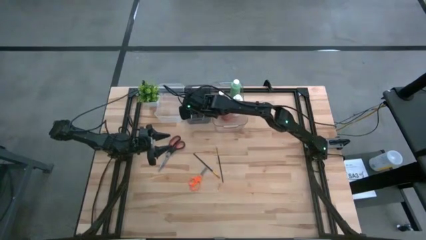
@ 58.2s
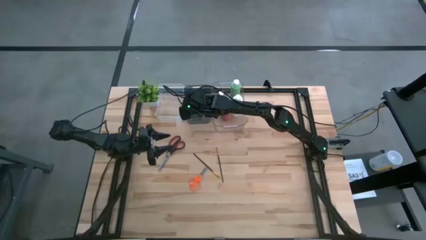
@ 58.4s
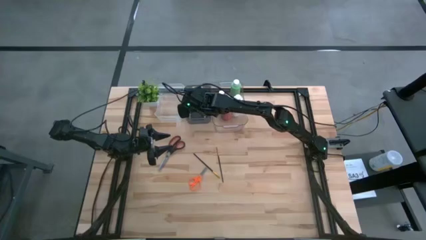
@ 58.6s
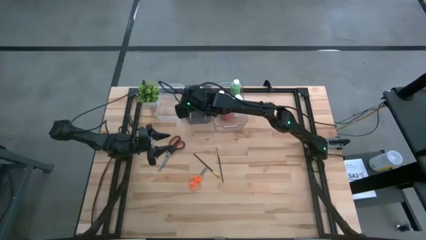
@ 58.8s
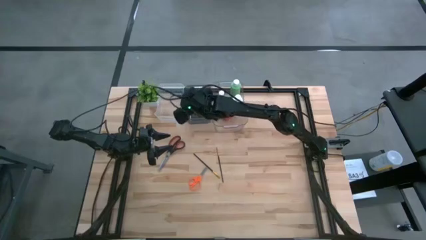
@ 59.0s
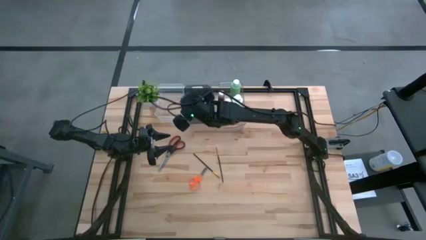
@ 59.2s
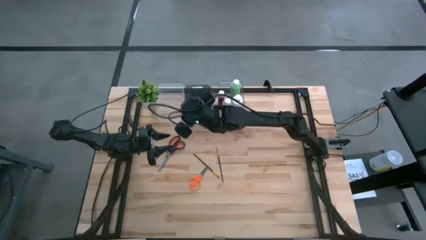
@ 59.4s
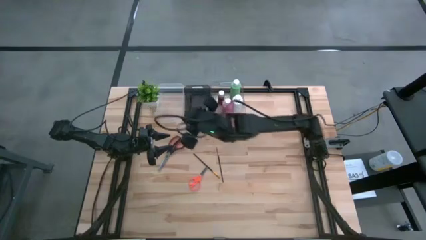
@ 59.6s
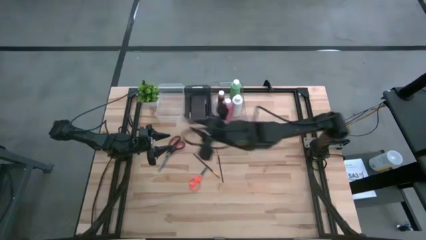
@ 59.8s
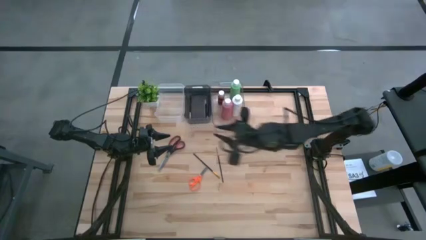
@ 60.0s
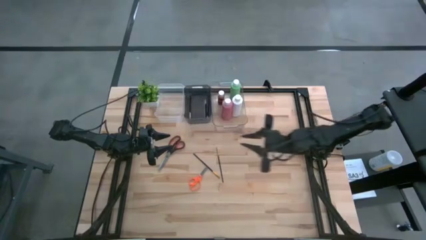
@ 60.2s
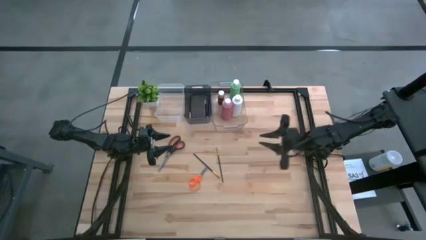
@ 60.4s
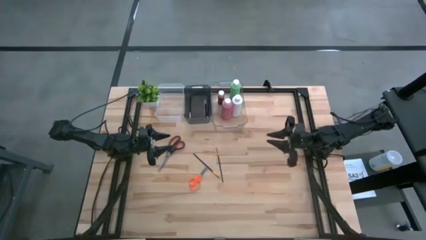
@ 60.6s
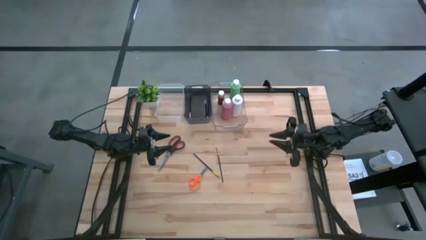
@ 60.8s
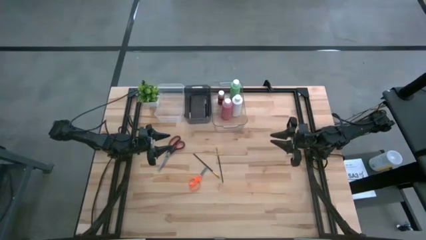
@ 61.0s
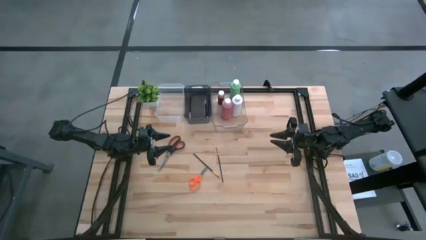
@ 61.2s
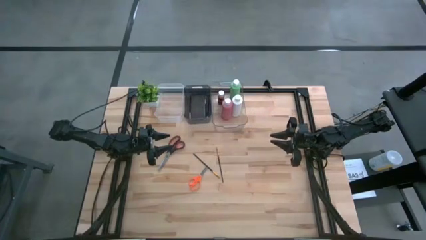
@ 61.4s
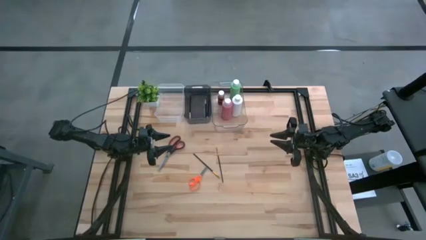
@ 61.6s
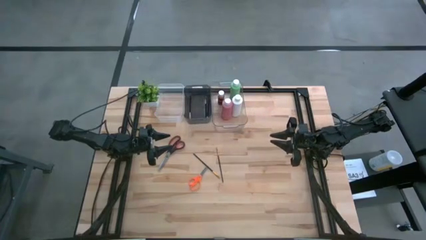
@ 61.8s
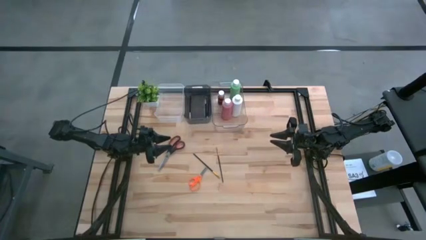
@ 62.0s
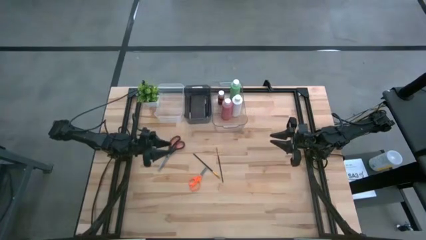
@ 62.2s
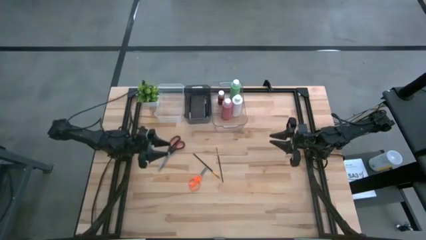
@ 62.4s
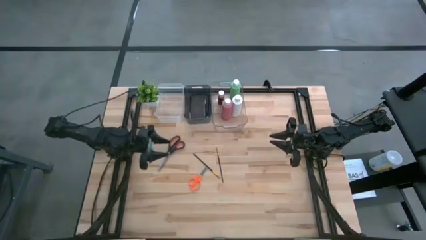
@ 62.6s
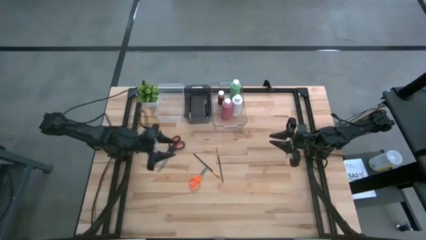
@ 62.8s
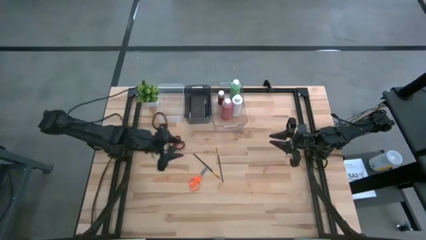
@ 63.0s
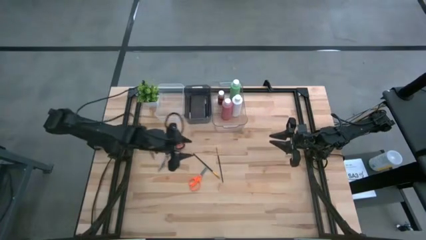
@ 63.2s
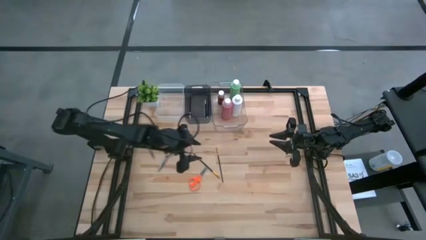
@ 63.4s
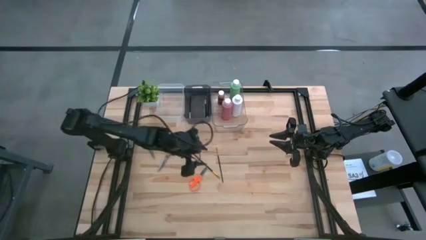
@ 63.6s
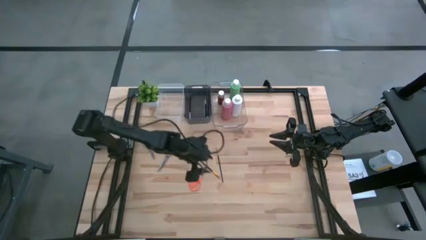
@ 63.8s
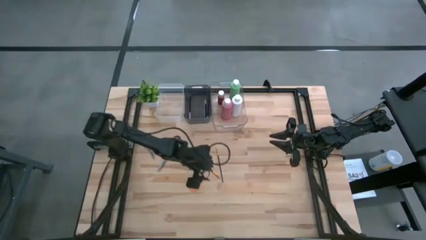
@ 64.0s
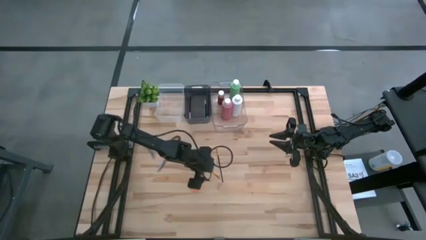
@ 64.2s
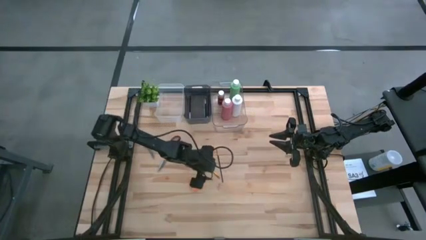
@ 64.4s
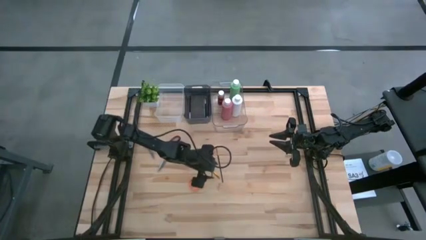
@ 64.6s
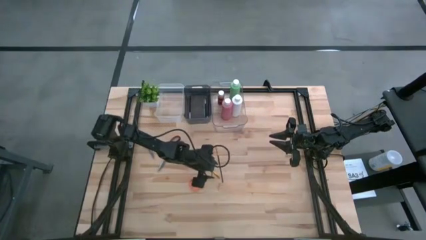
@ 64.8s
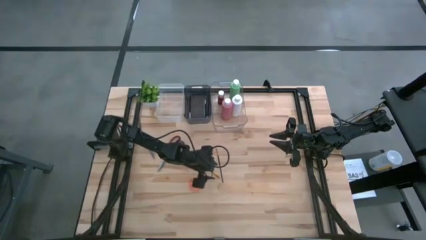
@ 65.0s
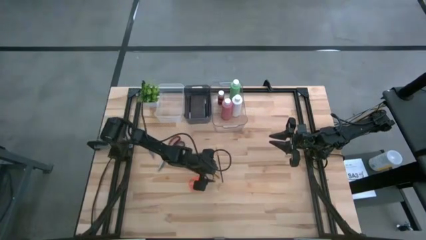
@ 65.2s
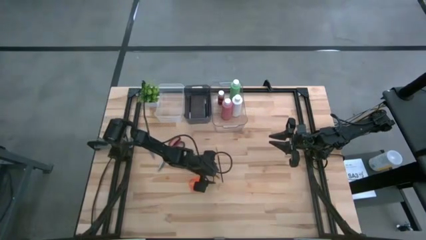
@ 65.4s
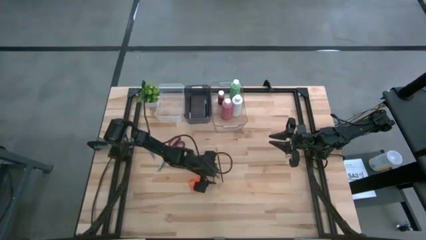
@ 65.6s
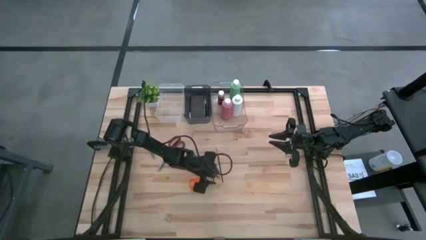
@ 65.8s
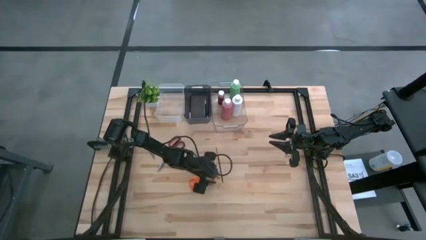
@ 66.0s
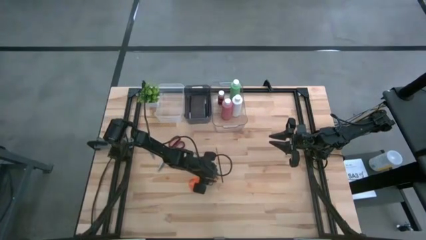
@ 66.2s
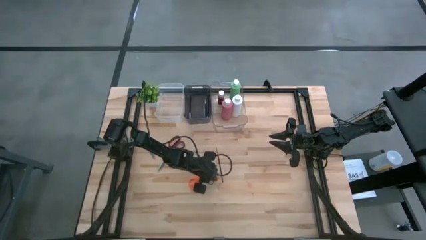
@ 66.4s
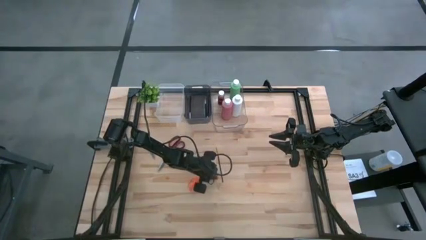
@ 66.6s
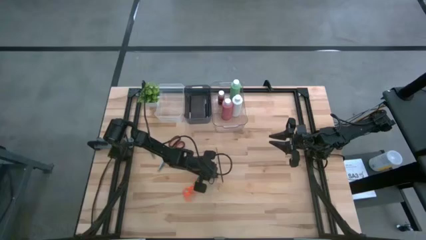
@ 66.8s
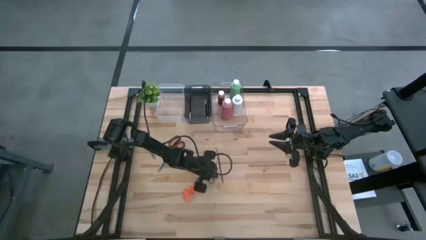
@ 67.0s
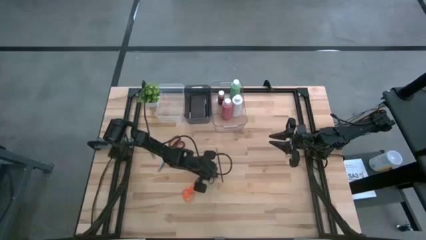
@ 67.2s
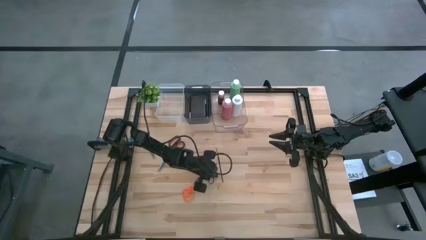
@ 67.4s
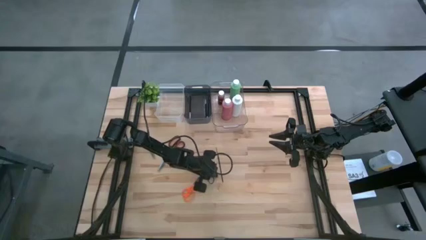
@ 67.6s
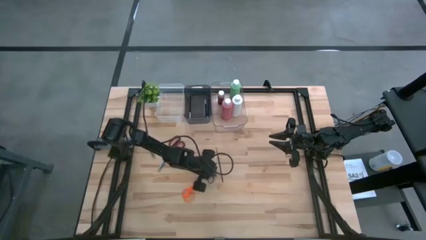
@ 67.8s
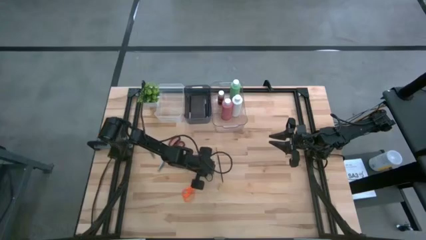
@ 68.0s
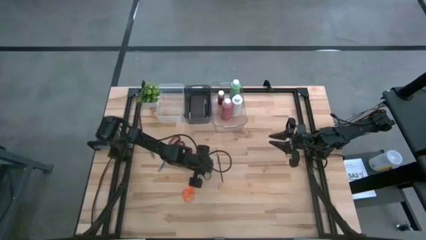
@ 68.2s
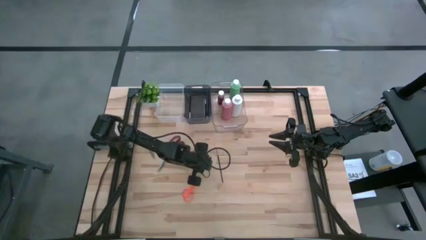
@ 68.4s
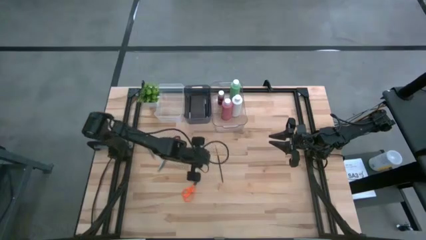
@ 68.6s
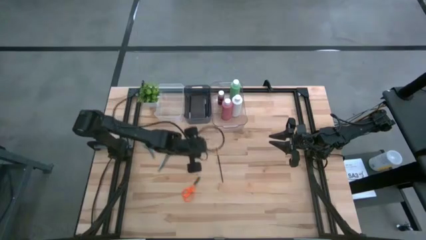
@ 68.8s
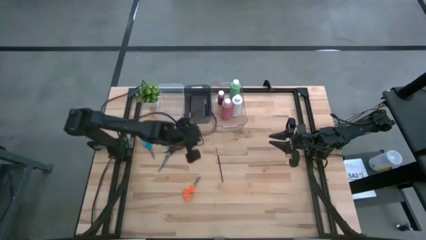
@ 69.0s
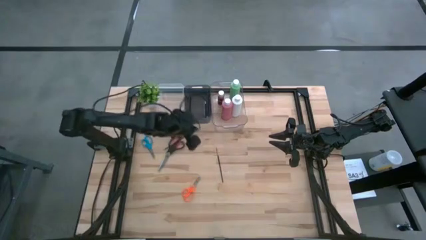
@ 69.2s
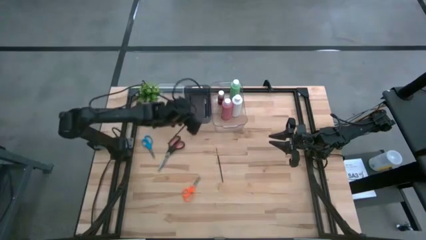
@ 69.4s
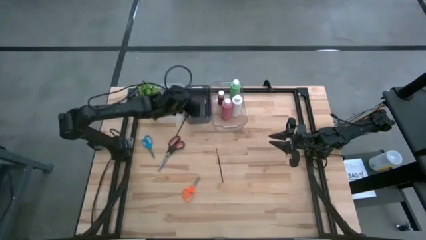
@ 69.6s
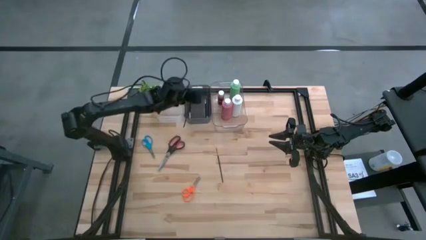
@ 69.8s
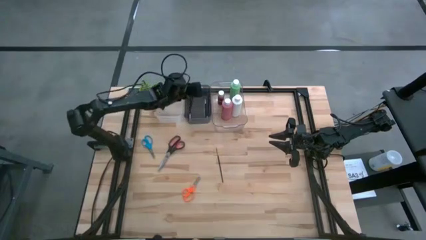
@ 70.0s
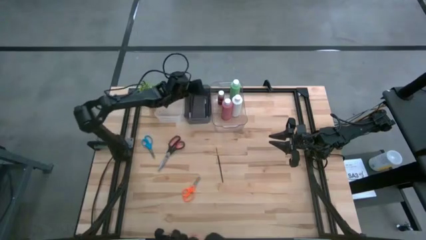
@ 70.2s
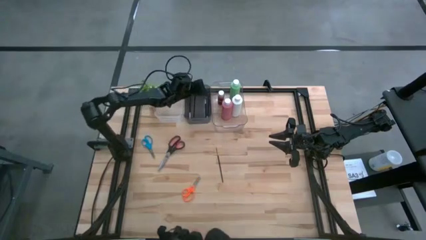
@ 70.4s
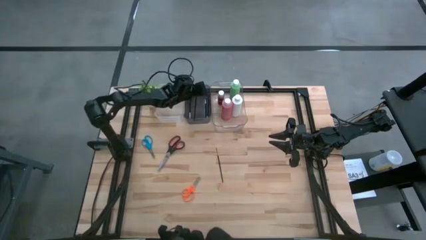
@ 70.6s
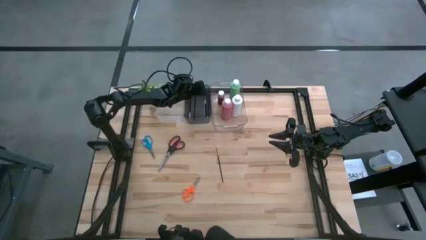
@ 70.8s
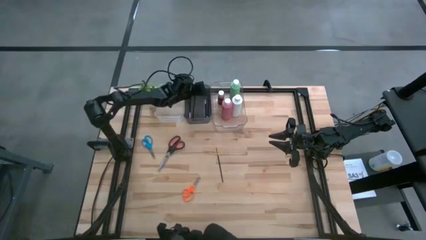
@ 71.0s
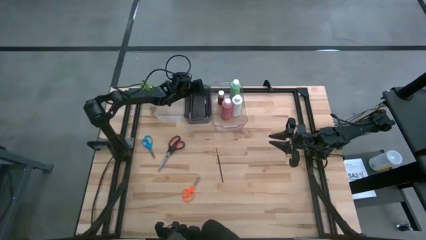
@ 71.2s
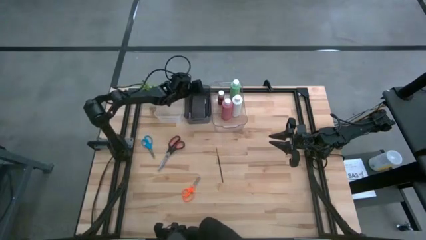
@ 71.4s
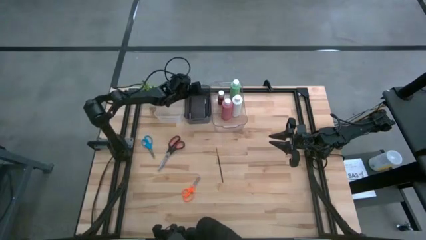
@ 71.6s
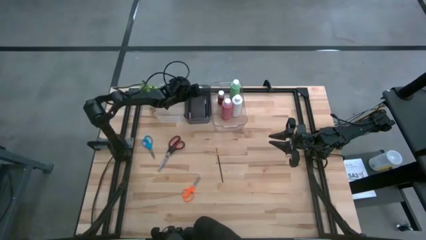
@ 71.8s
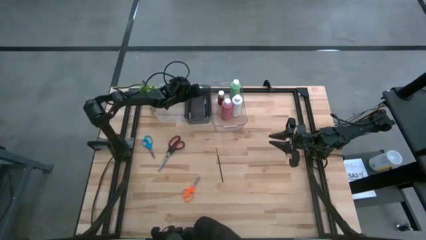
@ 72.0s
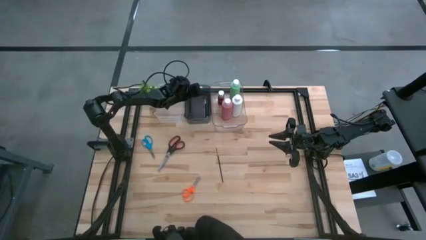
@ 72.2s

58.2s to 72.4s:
Task: Pick & Place Paint Supplies
Put the left gold paintbrush into the black bin

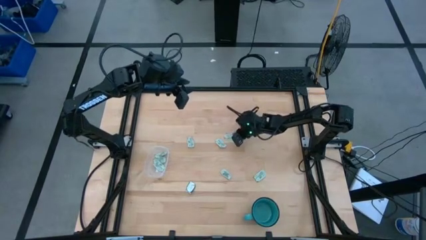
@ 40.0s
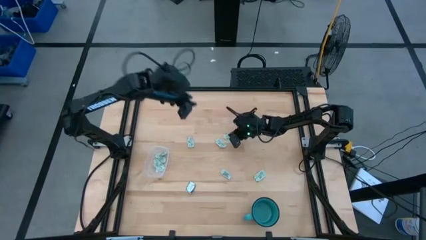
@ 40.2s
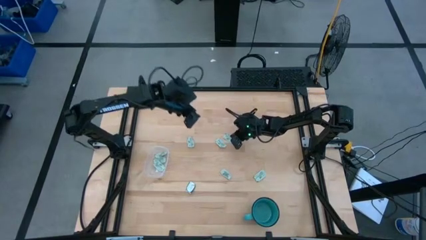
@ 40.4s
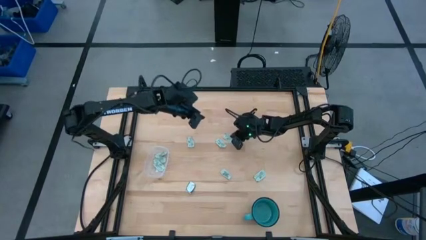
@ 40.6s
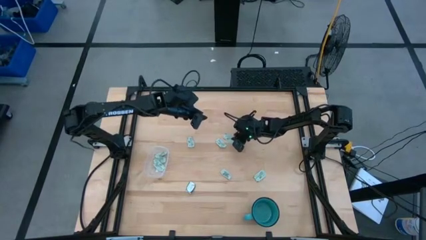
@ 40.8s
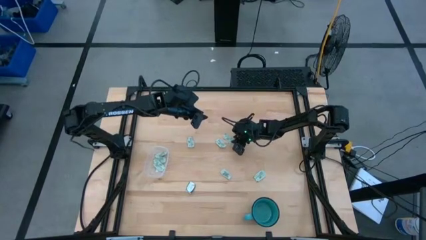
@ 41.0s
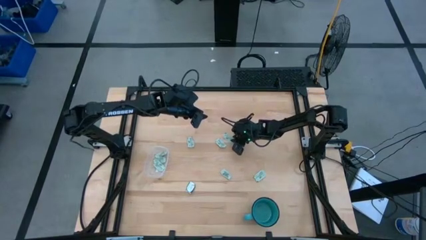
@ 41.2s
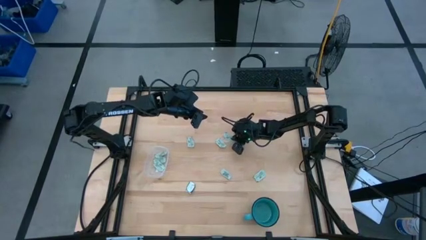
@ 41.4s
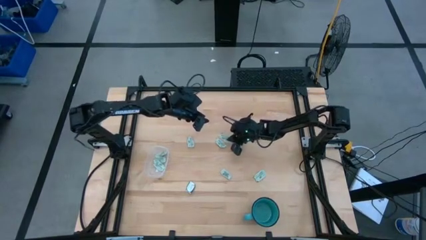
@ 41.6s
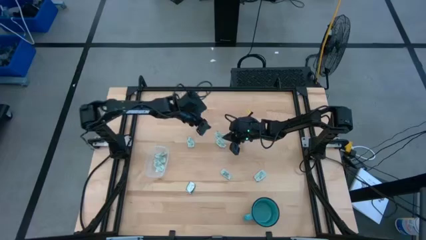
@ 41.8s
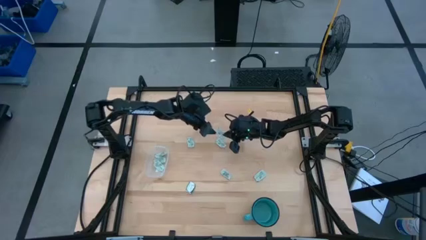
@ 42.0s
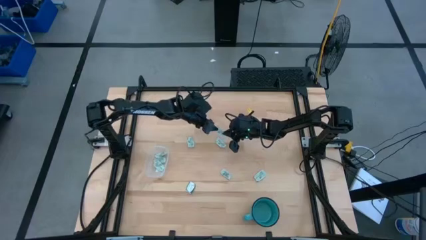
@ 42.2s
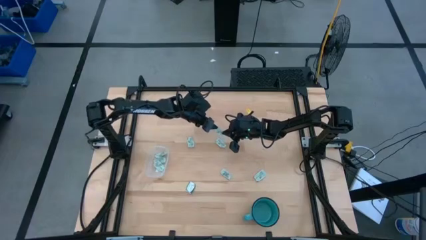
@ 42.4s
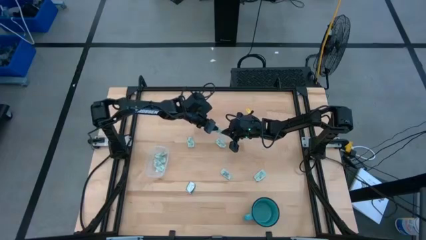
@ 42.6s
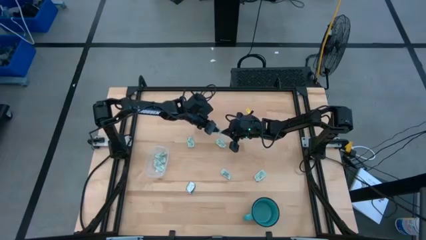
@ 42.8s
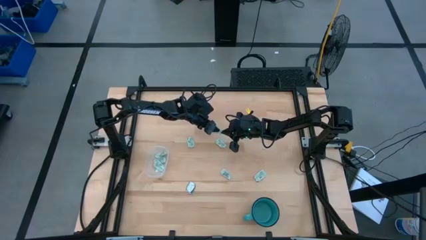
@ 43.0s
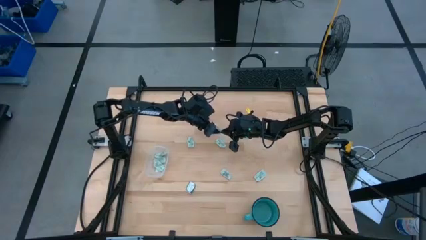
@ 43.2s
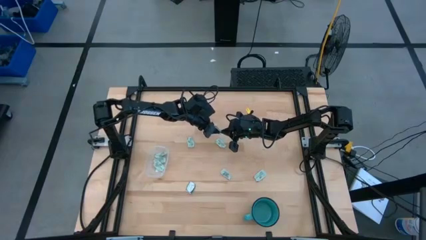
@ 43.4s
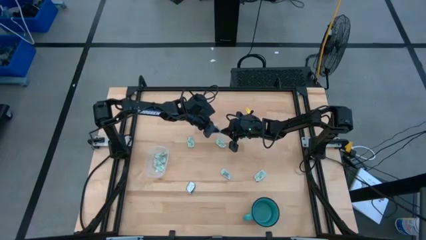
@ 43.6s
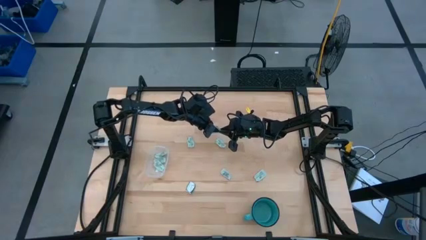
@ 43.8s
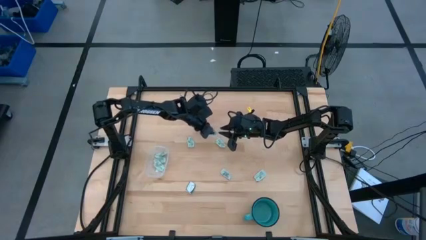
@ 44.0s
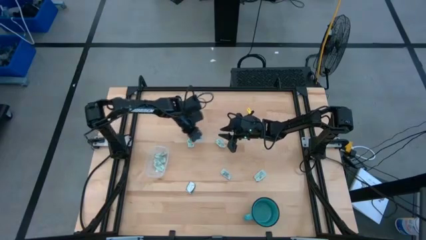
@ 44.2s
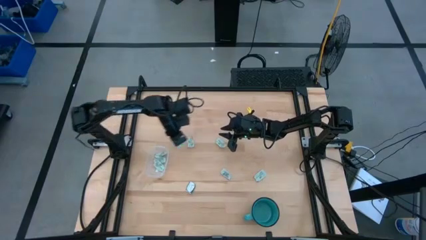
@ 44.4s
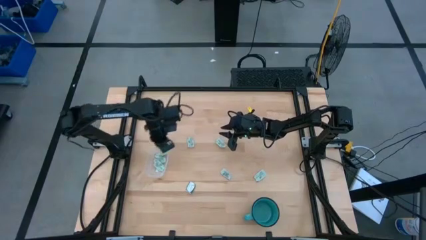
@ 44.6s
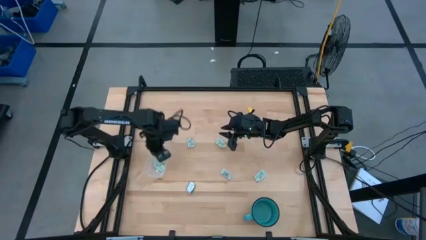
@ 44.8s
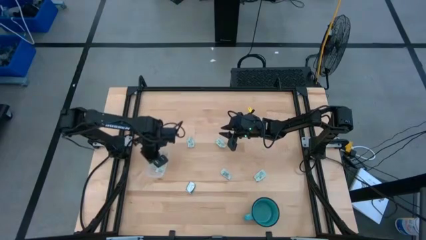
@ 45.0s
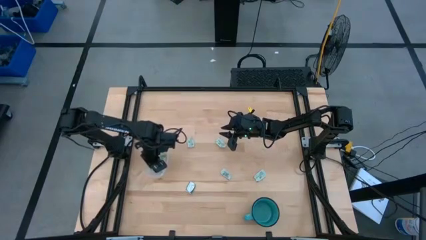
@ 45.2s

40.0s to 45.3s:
Task: Pick and place Stevia / Truvia into bins
Put the light green stevia packet into the transparent bin
